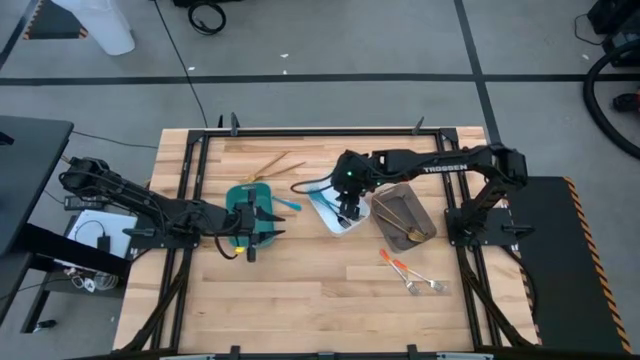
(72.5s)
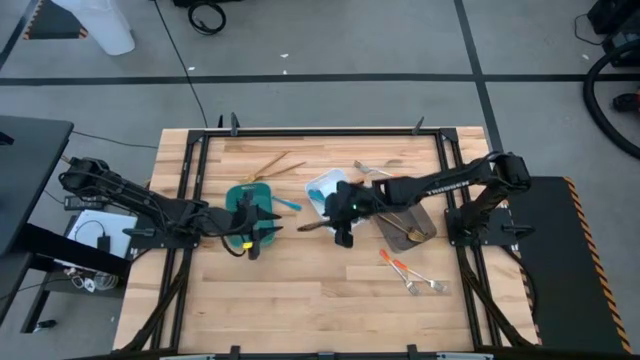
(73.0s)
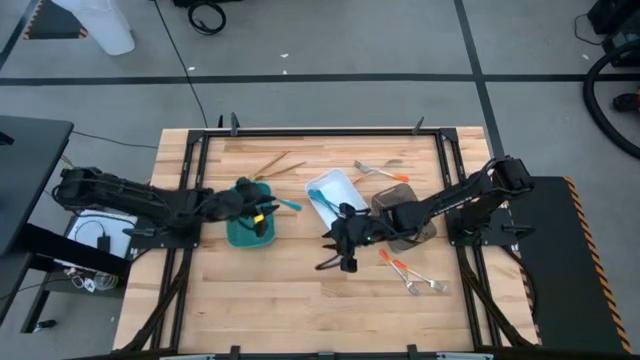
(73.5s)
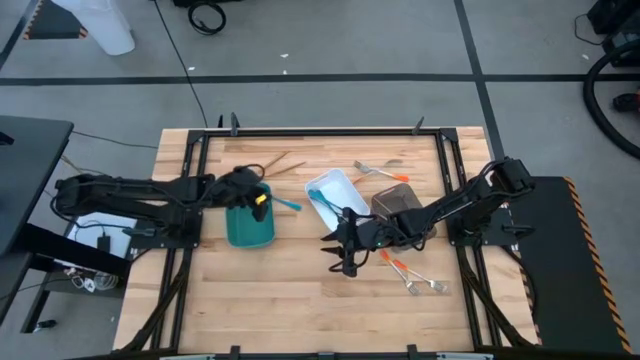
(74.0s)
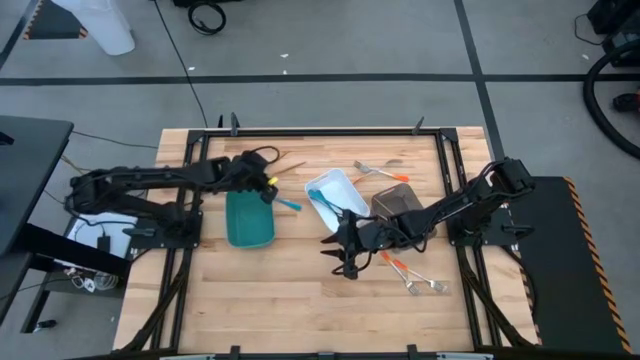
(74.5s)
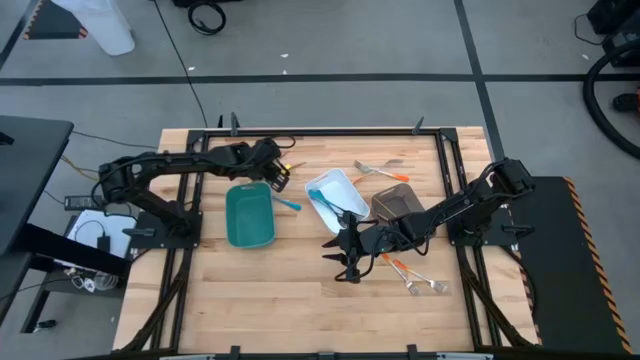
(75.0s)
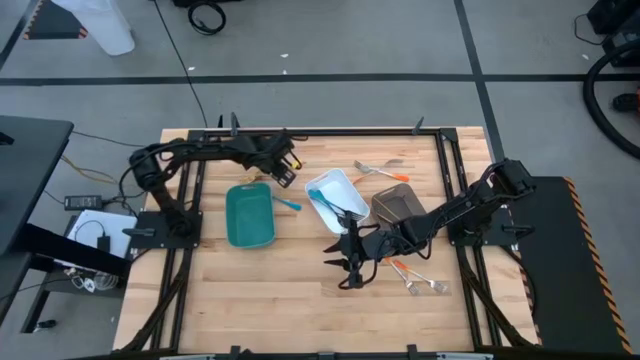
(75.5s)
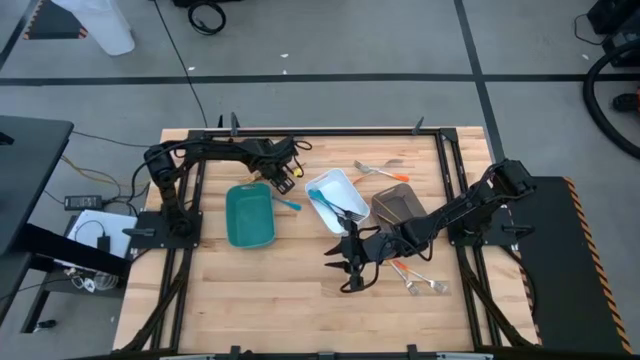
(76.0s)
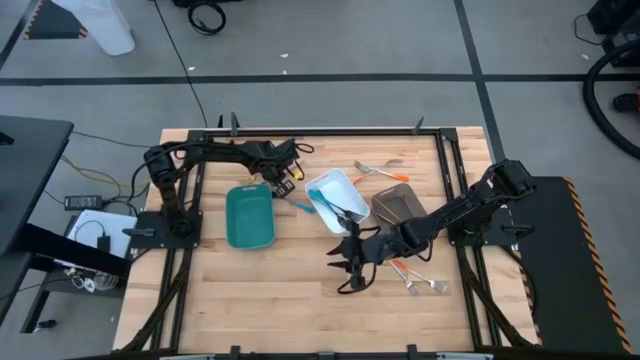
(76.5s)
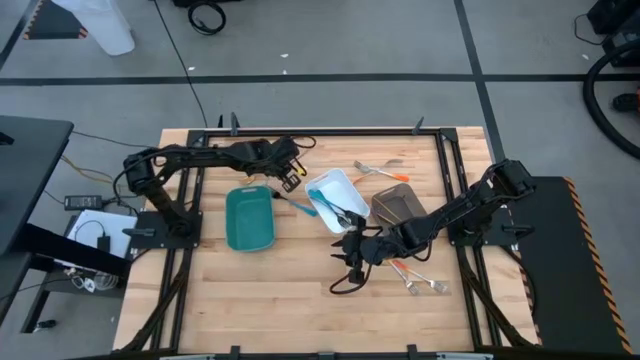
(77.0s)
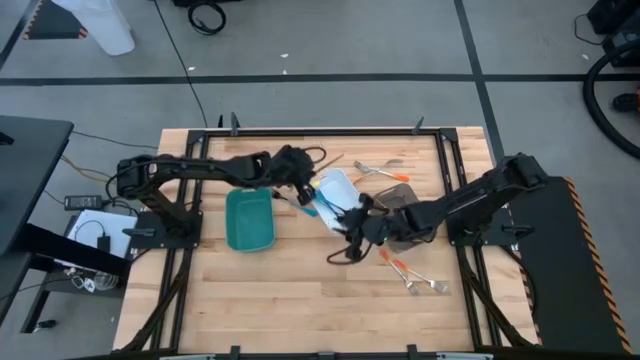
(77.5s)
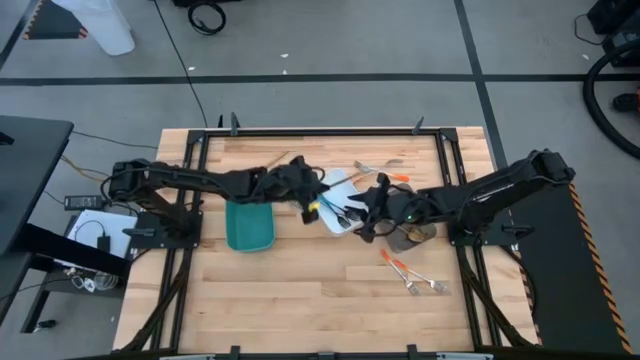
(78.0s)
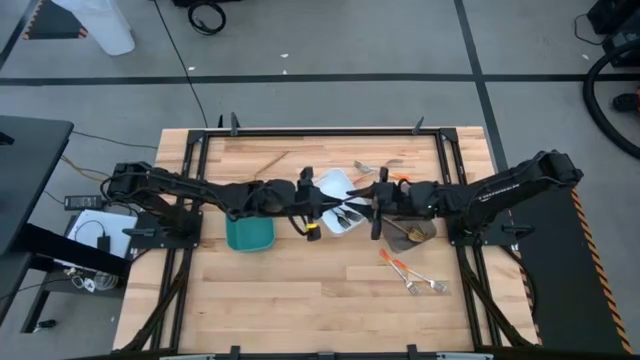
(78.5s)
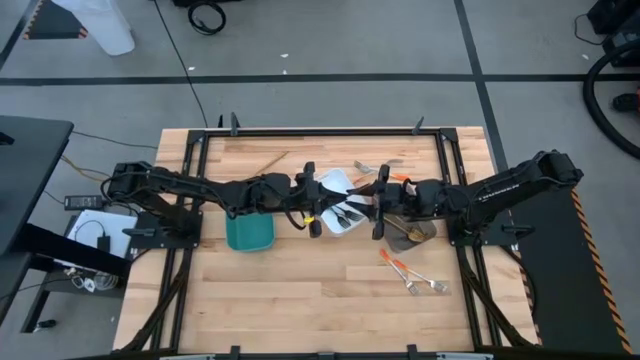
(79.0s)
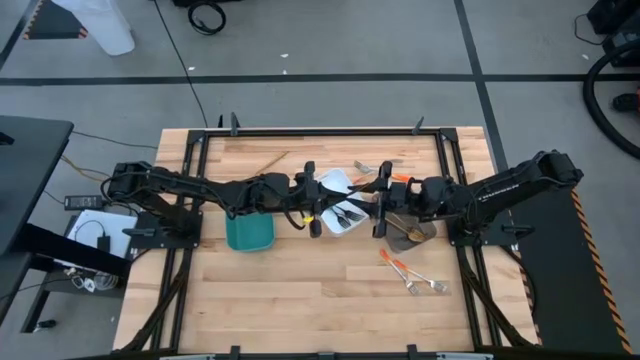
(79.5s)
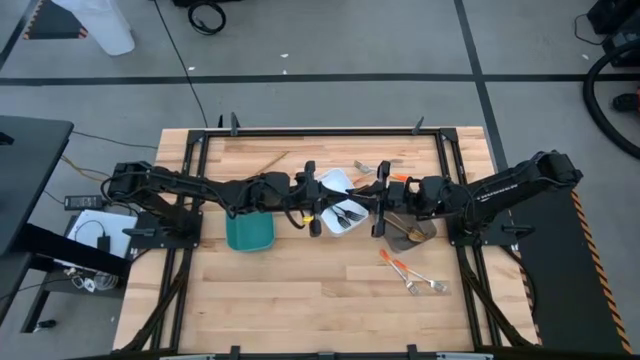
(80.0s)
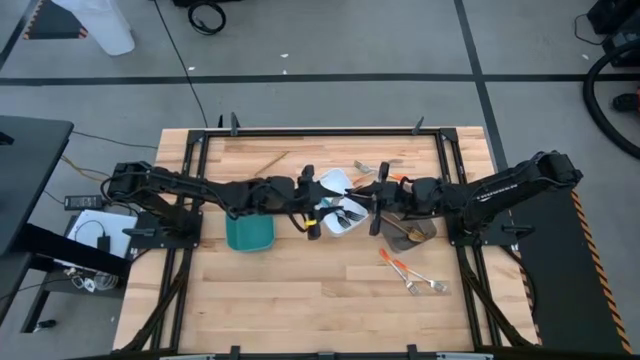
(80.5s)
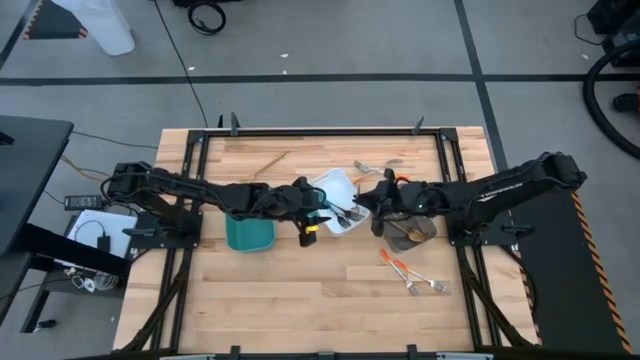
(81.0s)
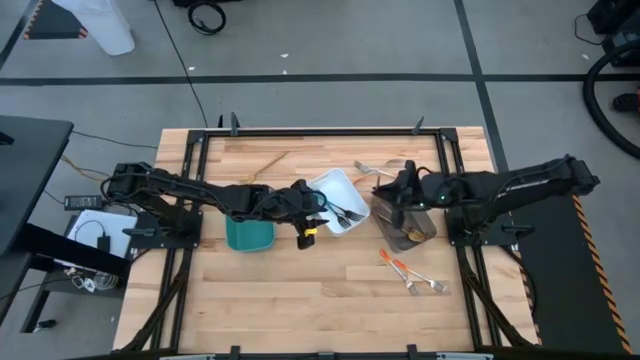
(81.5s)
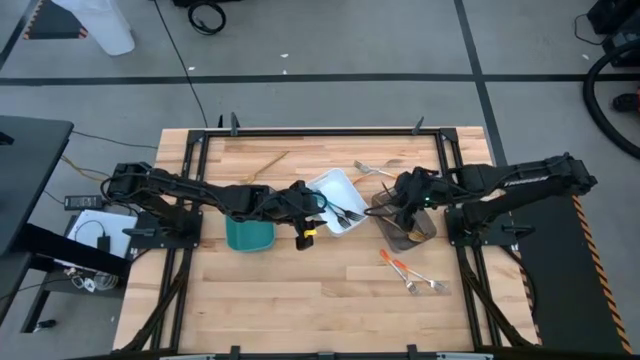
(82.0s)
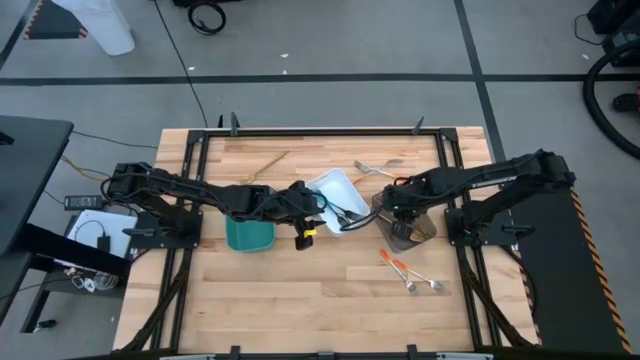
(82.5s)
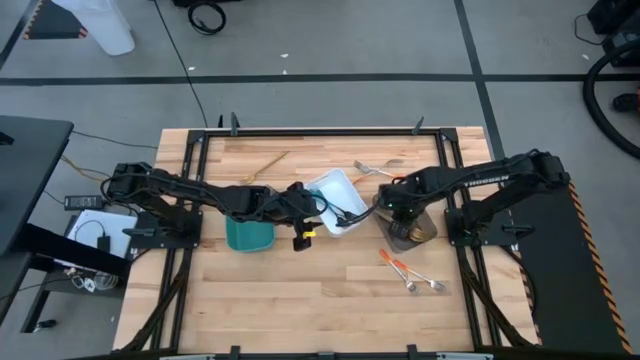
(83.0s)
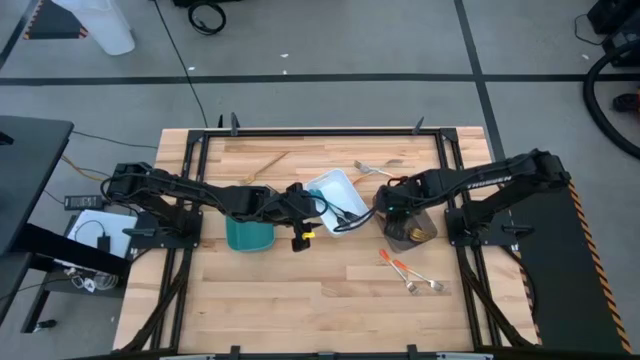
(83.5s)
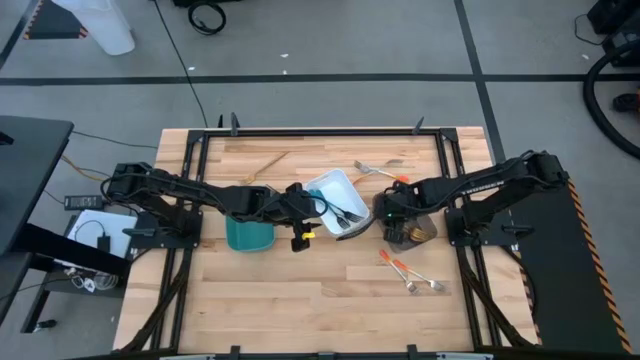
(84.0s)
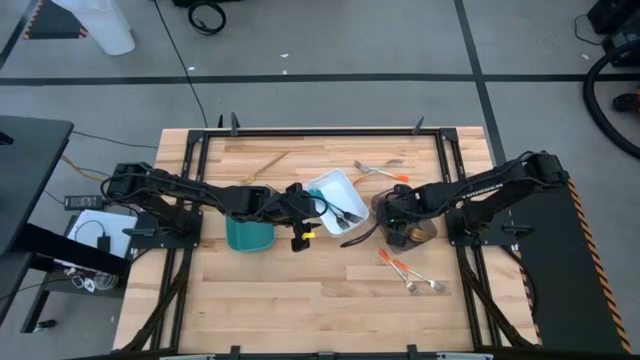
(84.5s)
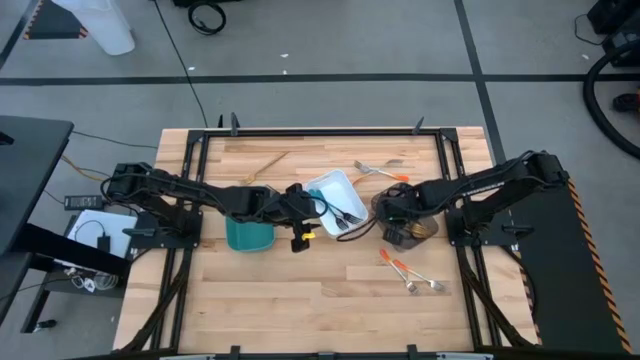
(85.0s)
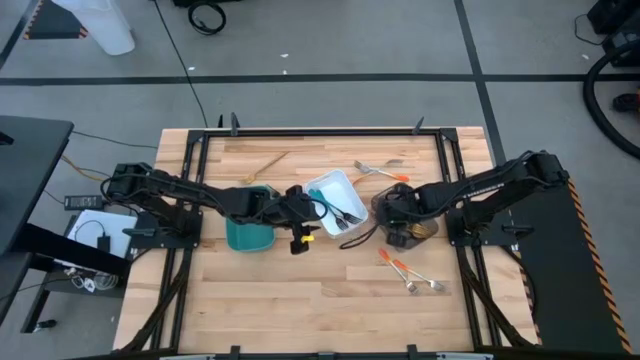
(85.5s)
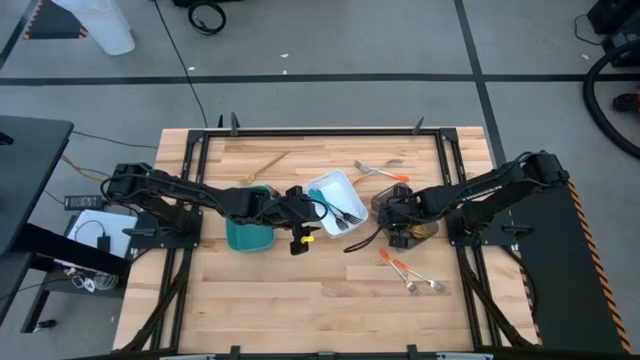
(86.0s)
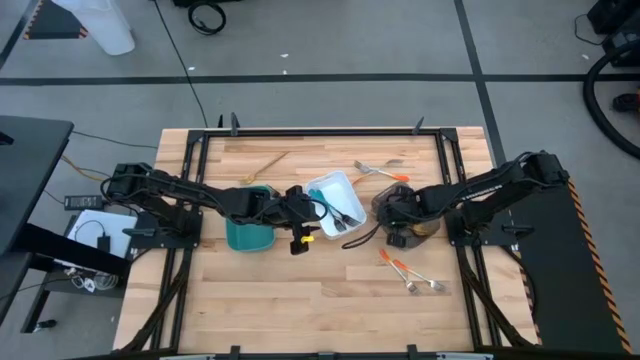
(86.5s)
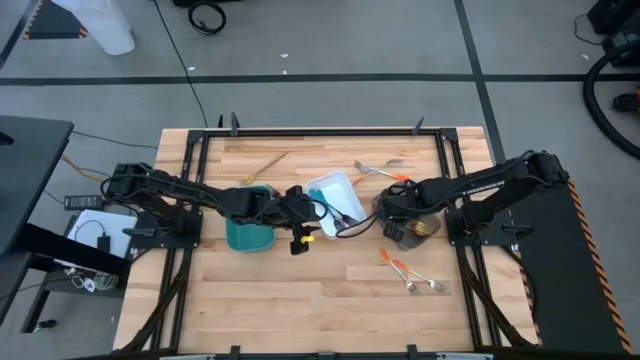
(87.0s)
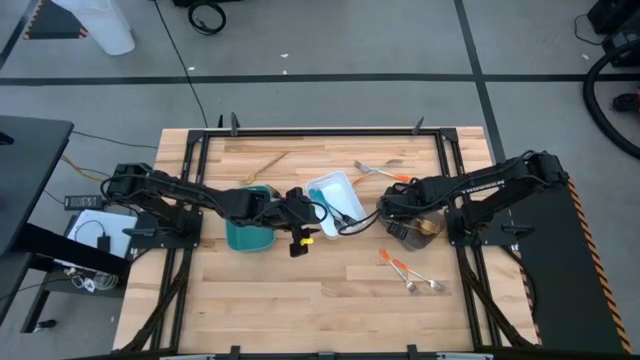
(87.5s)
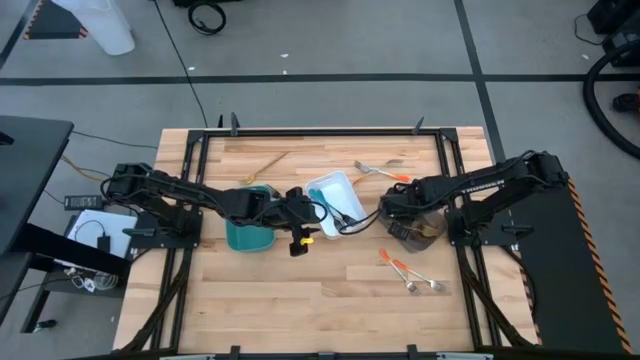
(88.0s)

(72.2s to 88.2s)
Task: Sort silverware by color (type)
Put the gold fork into the black bin

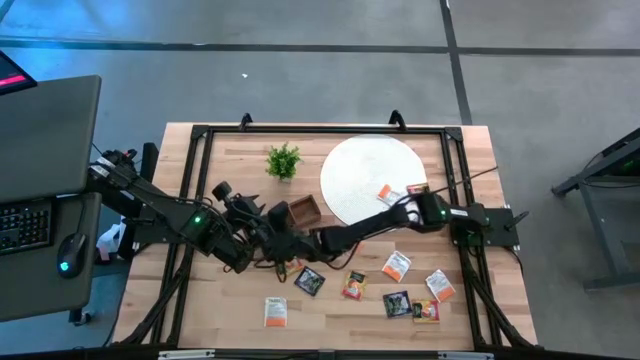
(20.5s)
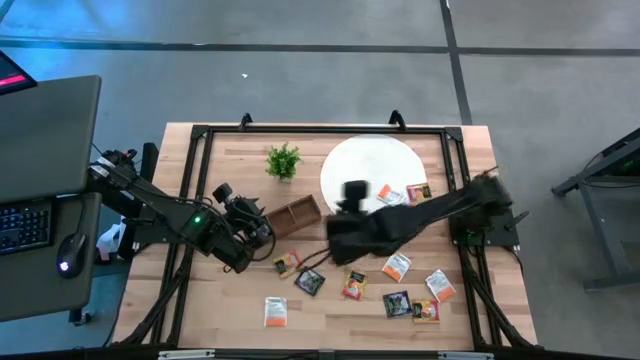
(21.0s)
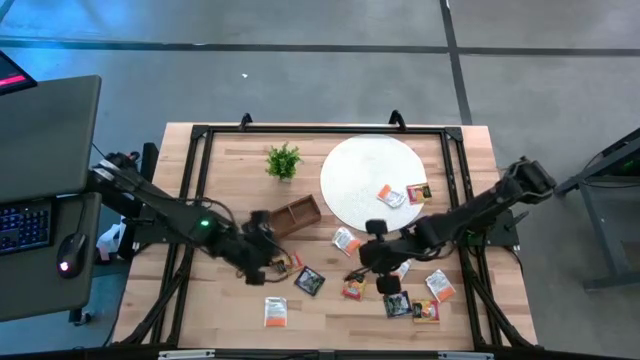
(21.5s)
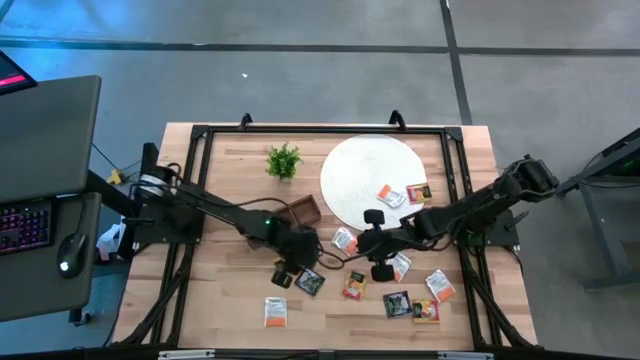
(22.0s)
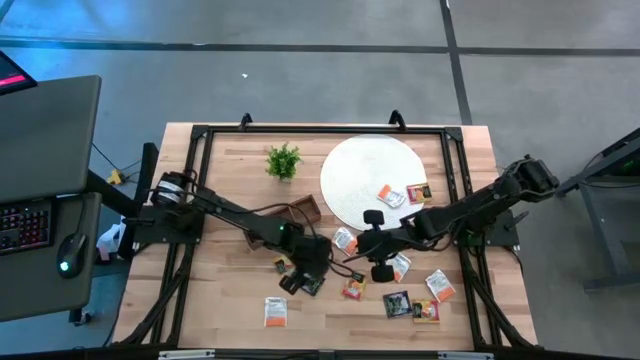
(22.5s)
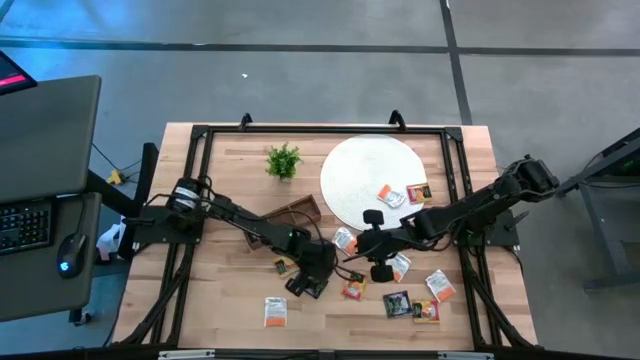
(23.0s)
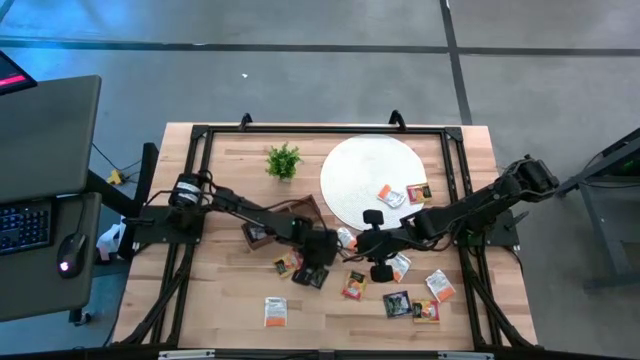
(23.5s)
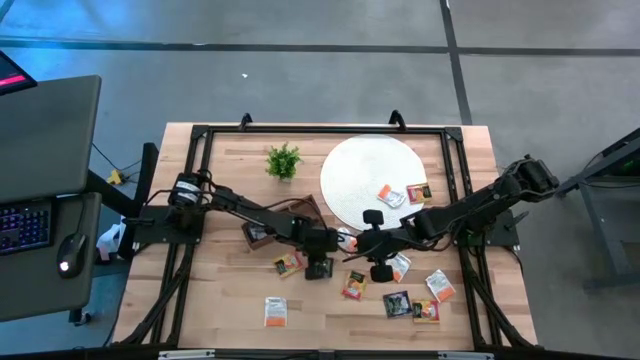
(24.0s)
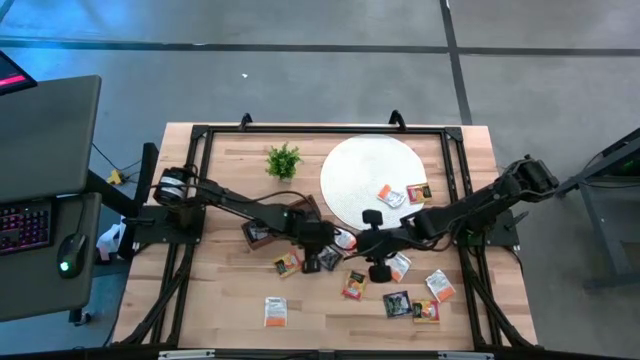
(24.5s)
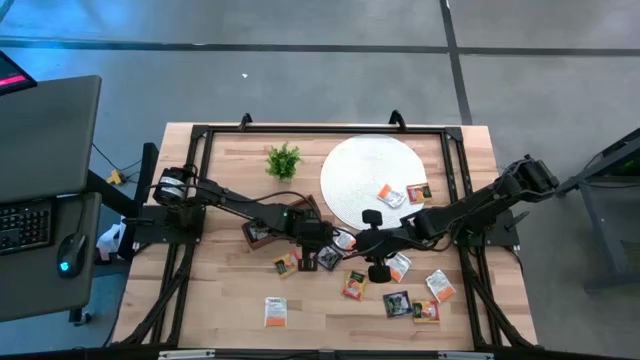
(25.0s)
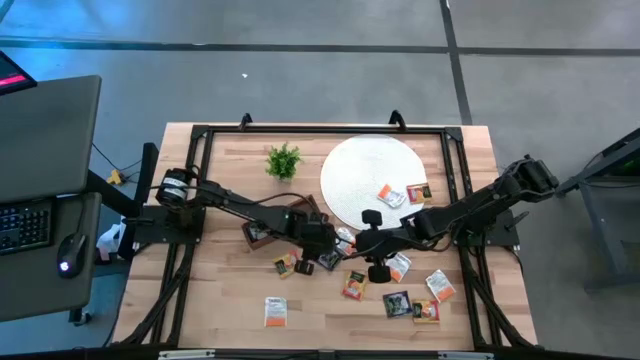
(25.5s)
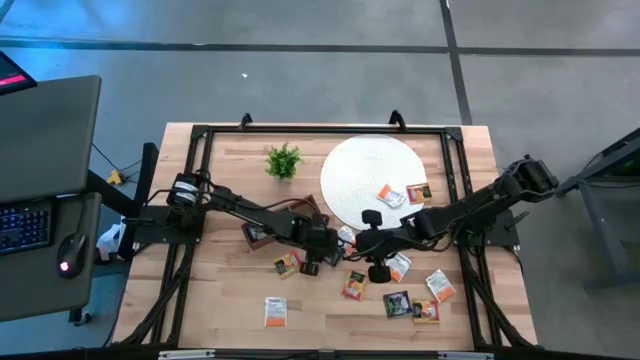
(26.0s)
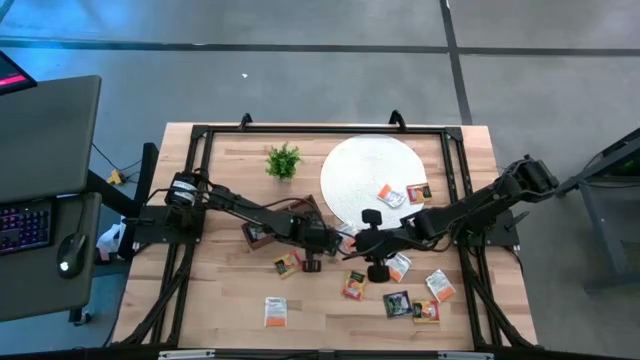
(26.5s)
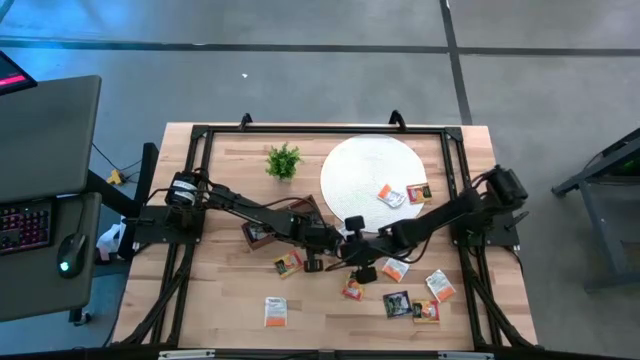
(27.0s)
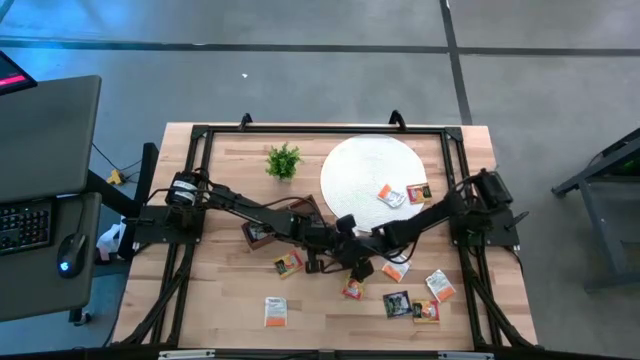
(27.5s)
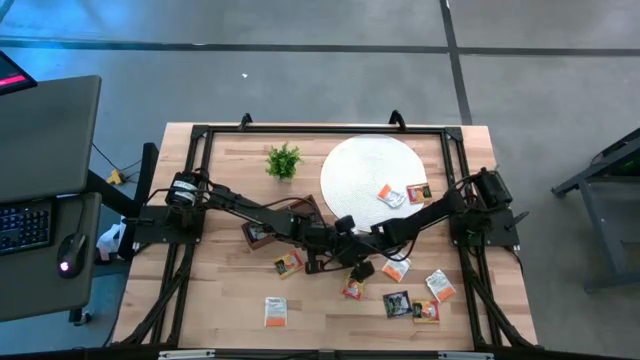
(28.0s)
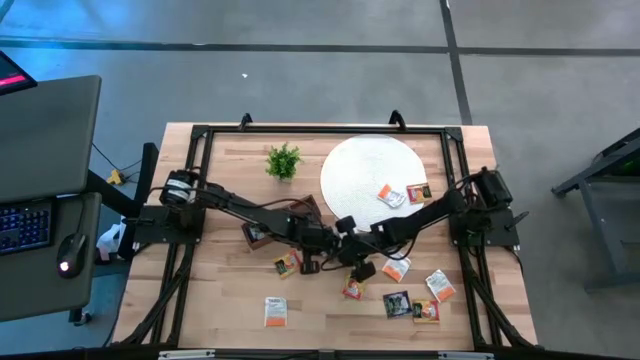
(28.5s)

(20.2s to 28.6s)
Task: Pick & Place Tea
Put the purple tea bag into the left section of the wooden organizer
